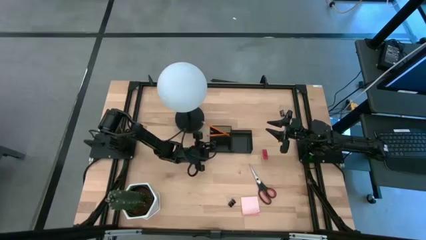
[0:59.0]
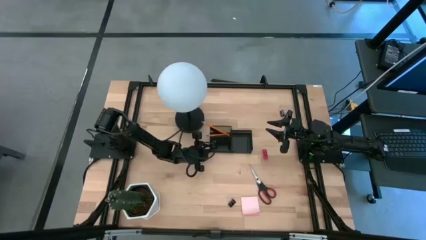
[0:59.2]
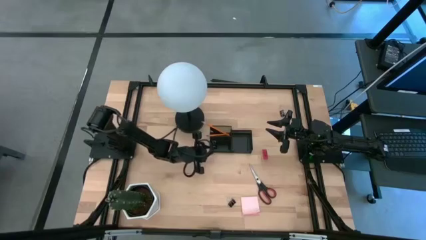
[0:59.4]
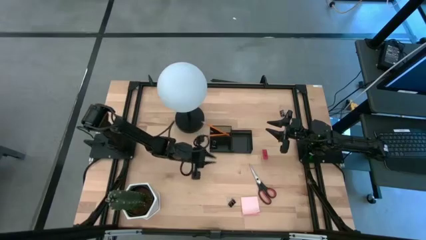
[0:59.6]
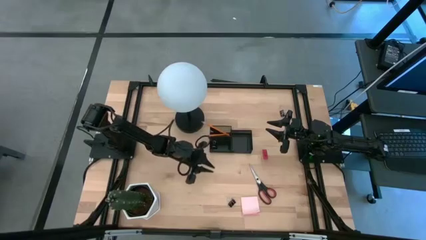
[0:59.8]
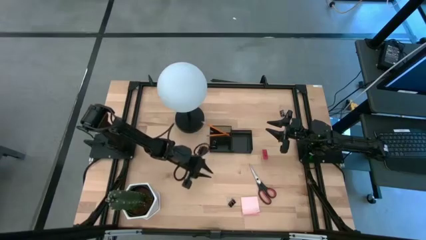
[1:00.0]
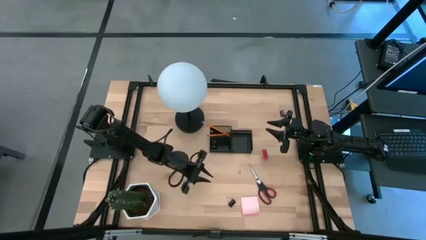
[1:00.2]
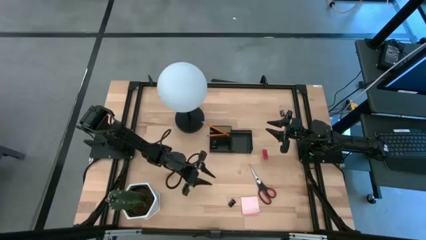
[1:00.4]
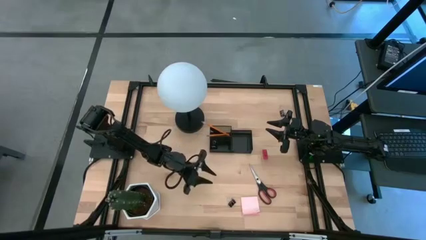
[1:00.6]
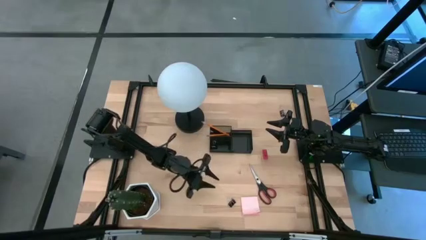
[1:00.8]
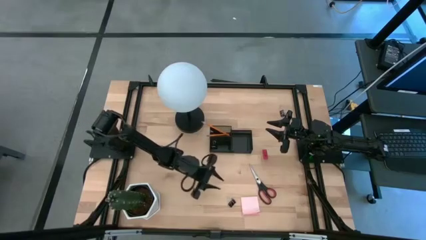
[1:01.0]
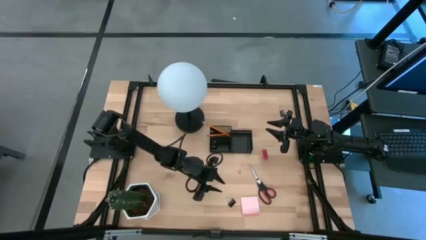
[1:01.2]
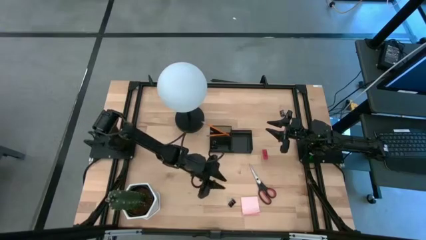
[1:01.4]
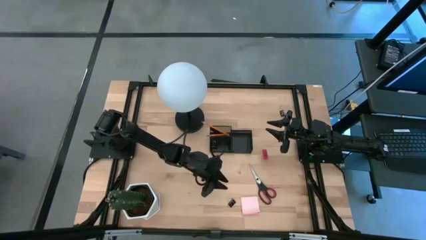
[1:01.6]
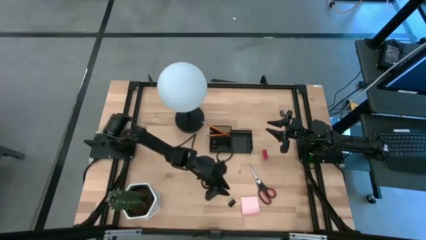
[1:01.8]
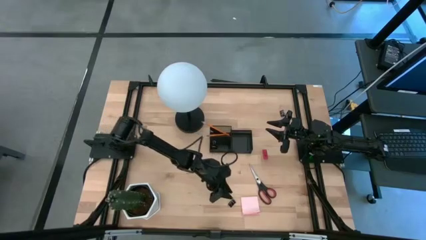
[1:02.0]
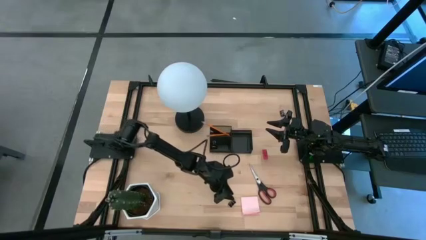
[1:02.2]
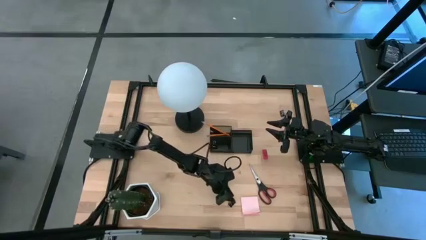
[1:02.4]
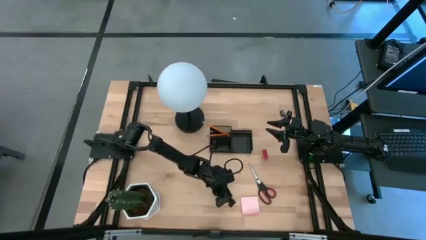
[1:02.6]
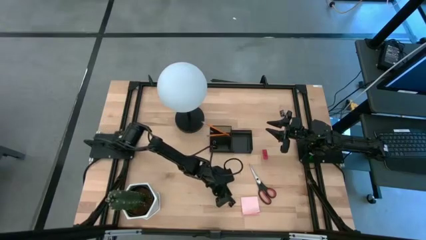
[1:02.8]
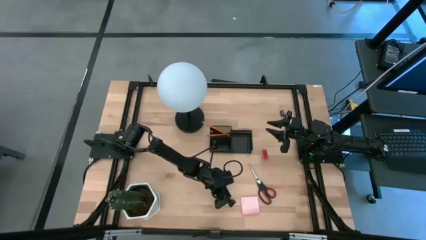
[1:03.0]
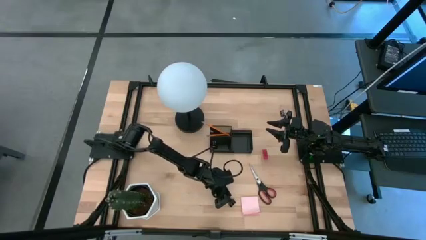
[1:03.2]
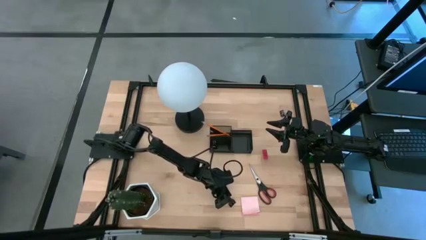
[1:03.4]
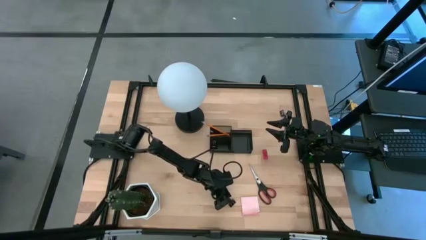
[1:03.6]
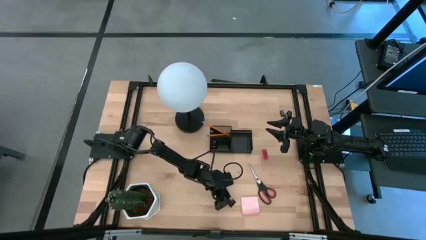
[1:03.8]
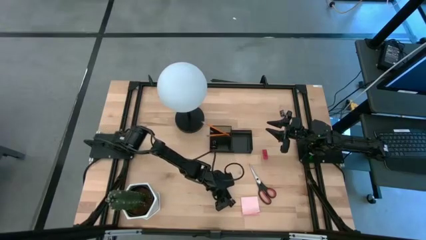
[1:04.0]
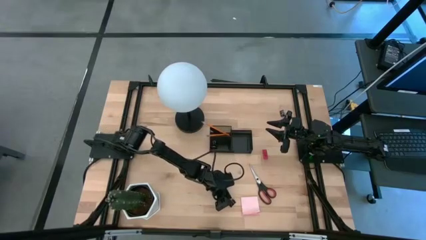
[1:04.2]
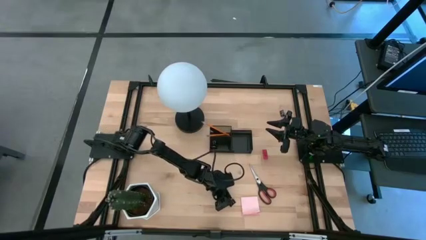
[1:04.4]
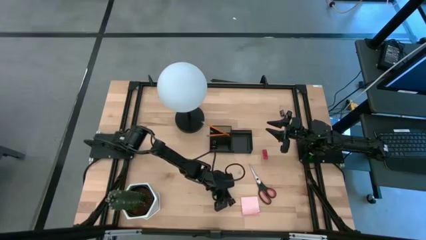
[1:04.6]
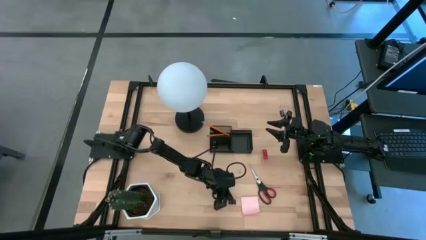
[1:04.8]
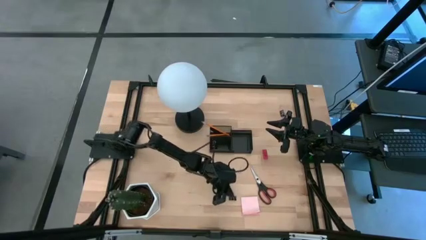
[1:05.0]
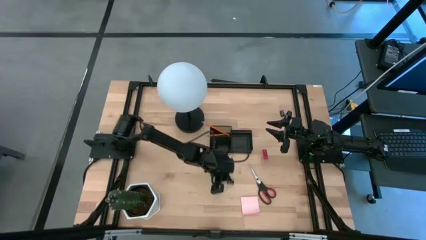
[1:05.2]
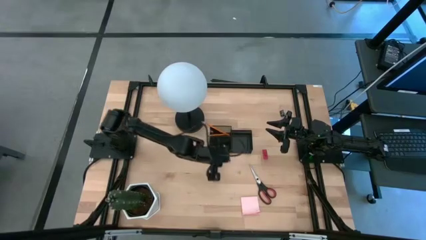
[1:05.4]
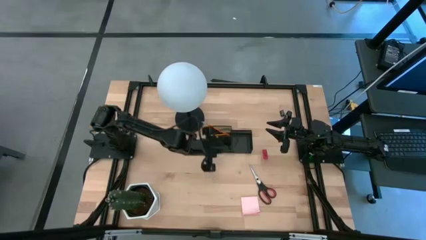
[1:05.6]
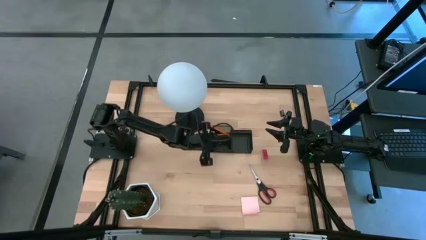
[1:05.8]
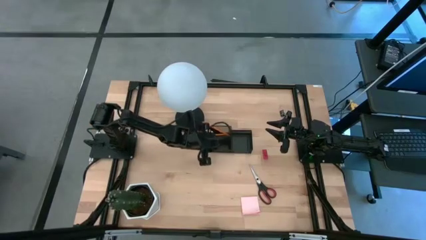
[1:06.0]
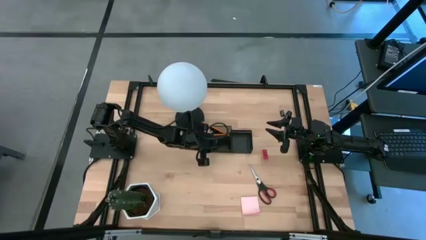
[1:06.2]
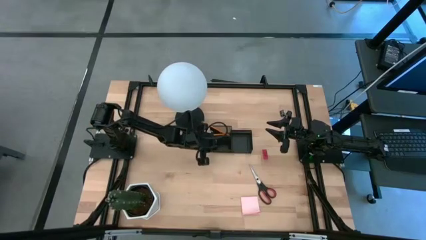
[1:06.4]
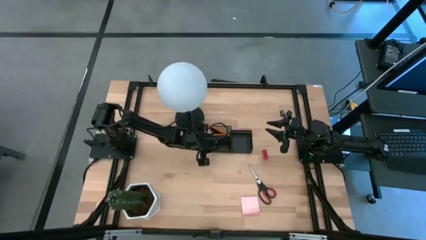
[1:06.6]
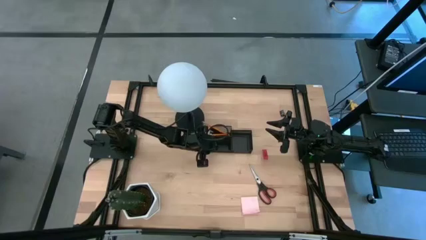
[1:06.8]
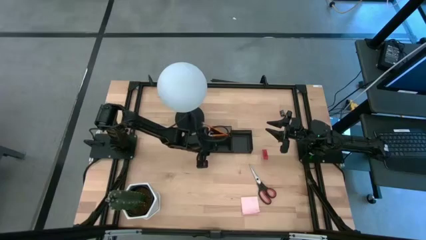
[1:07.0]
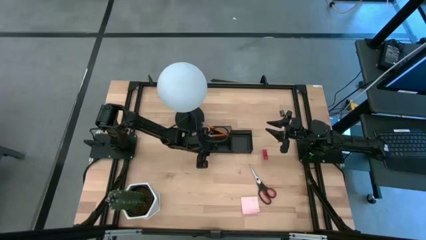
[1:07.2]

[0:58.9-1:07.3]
Task: Pick and place office supplies into organizer
Put the bottom black binder clip into the black desk organizer

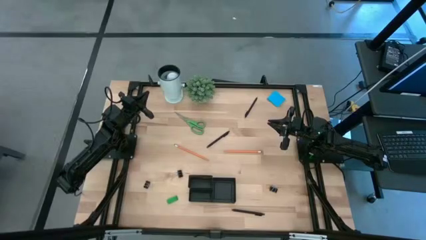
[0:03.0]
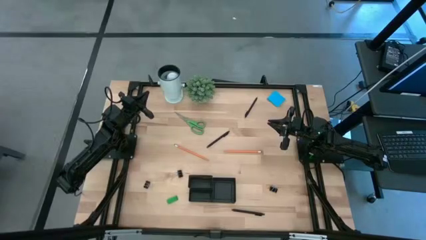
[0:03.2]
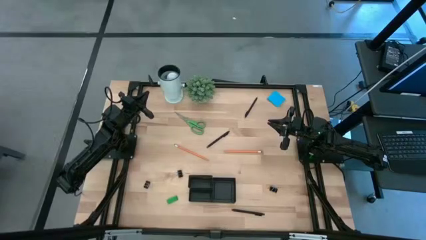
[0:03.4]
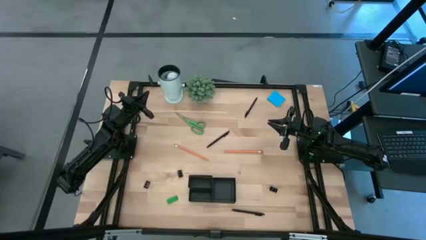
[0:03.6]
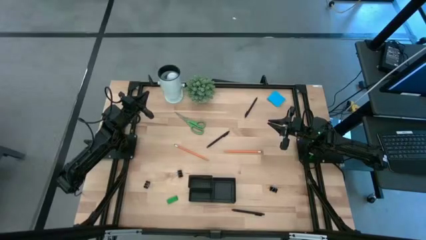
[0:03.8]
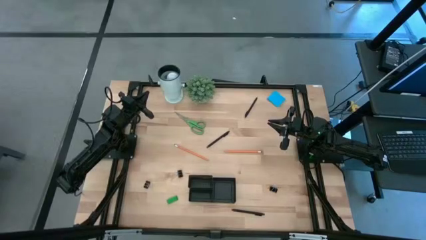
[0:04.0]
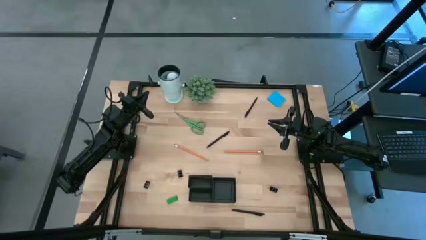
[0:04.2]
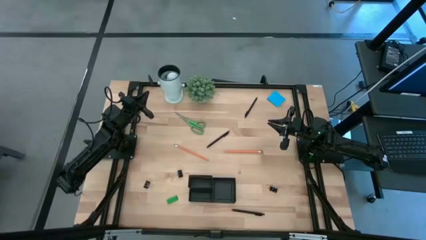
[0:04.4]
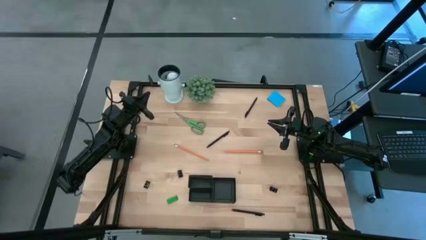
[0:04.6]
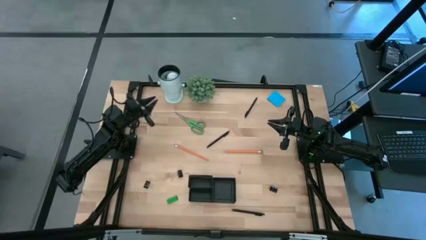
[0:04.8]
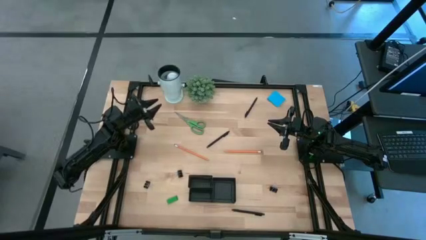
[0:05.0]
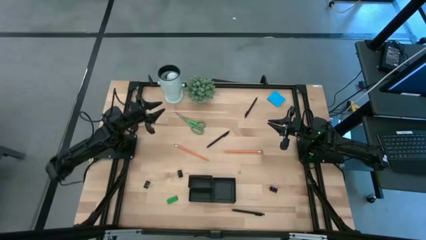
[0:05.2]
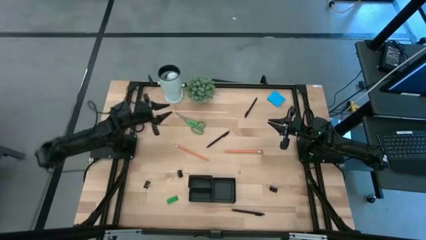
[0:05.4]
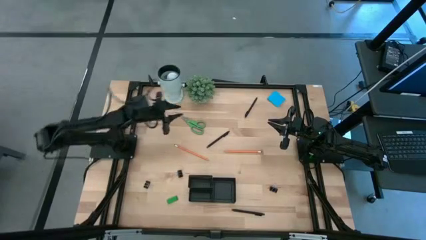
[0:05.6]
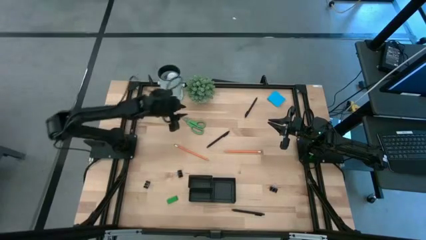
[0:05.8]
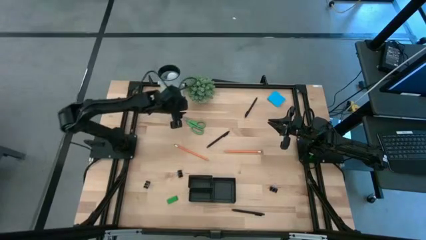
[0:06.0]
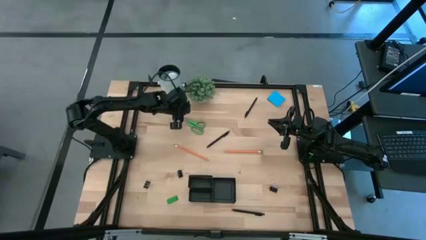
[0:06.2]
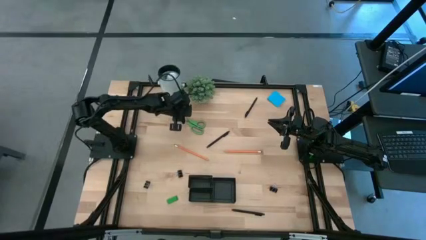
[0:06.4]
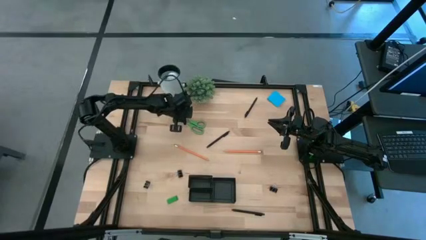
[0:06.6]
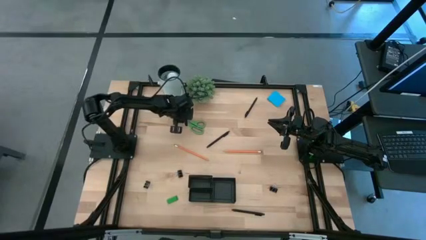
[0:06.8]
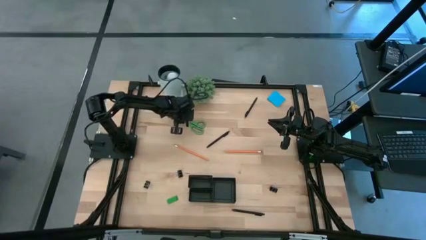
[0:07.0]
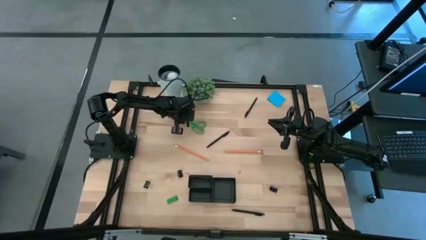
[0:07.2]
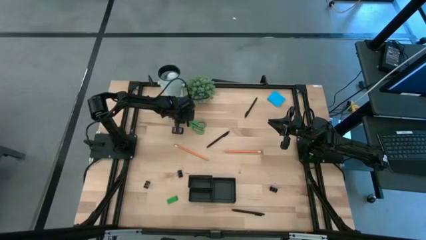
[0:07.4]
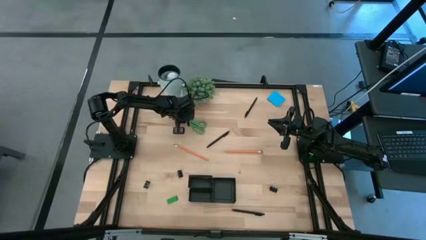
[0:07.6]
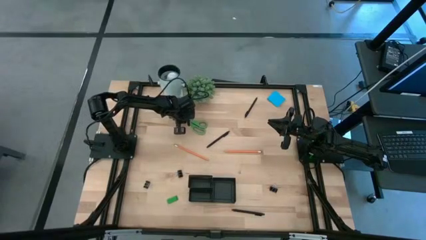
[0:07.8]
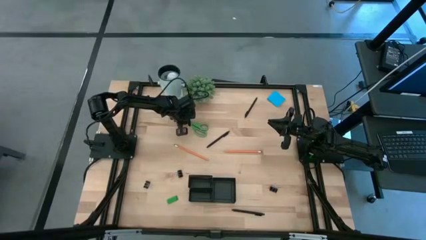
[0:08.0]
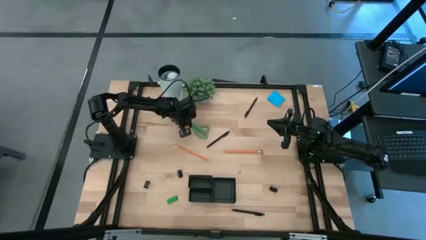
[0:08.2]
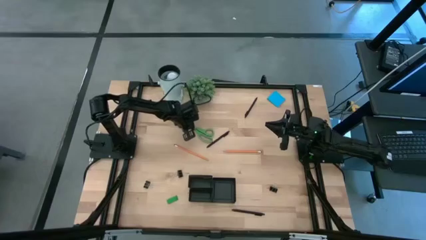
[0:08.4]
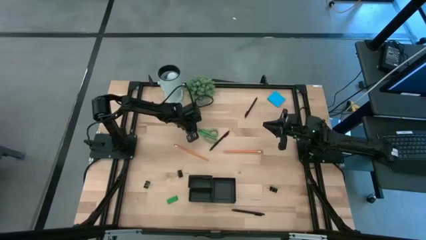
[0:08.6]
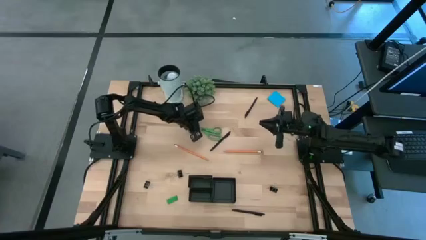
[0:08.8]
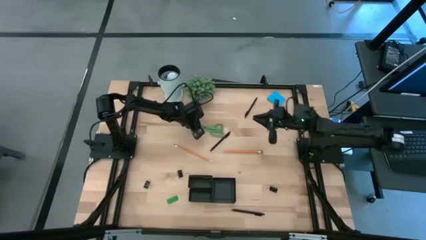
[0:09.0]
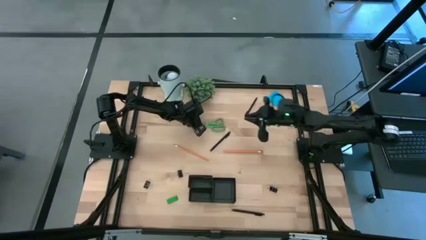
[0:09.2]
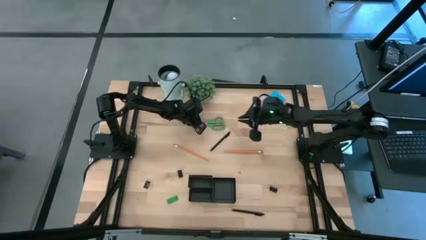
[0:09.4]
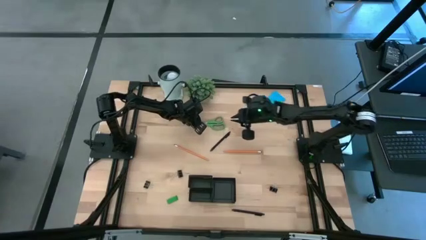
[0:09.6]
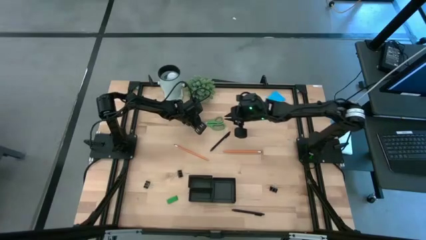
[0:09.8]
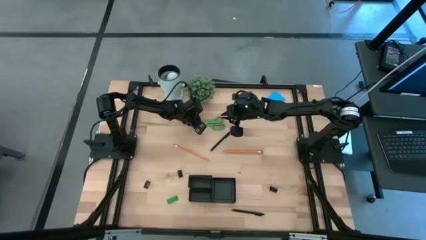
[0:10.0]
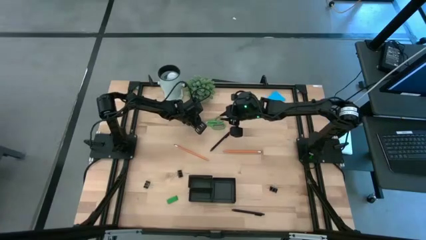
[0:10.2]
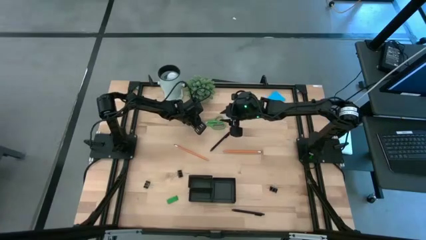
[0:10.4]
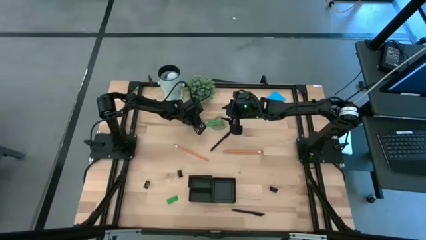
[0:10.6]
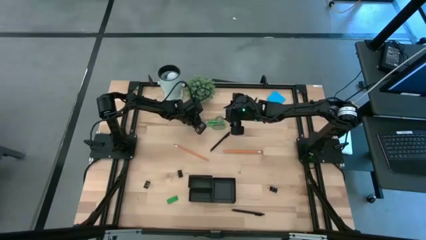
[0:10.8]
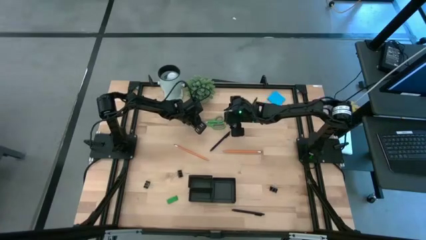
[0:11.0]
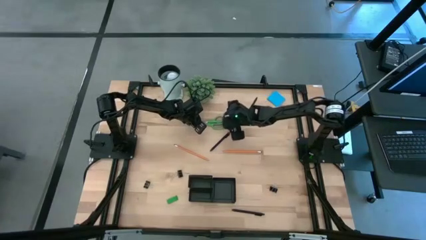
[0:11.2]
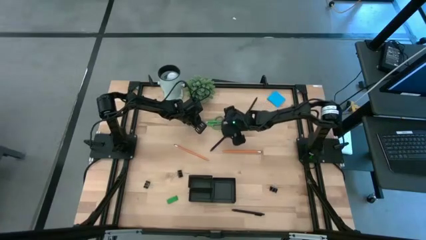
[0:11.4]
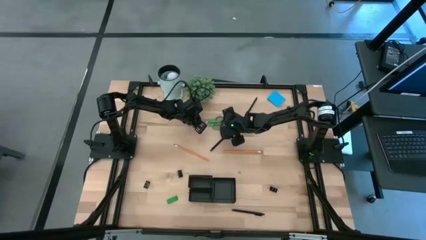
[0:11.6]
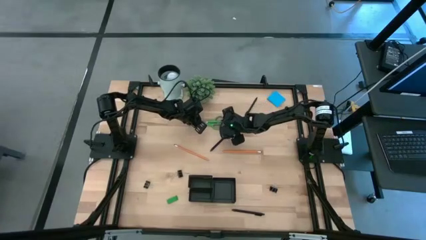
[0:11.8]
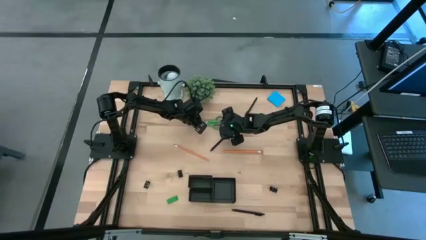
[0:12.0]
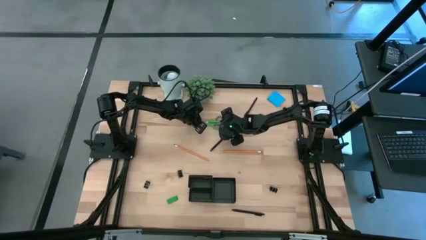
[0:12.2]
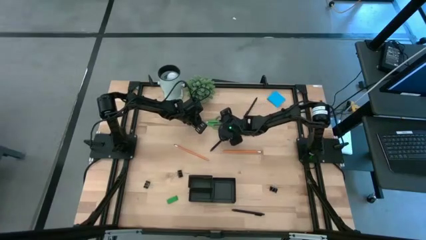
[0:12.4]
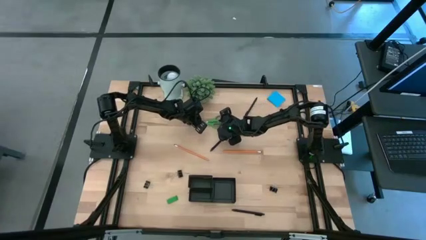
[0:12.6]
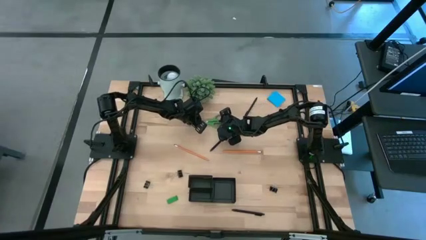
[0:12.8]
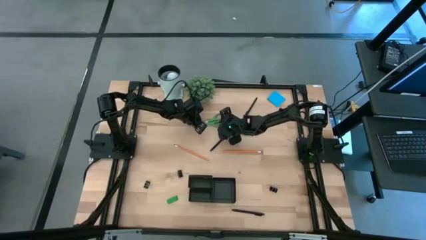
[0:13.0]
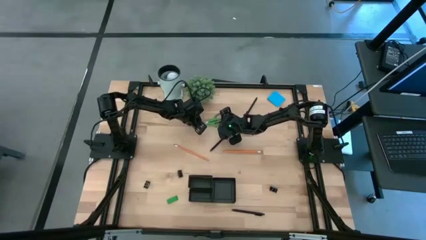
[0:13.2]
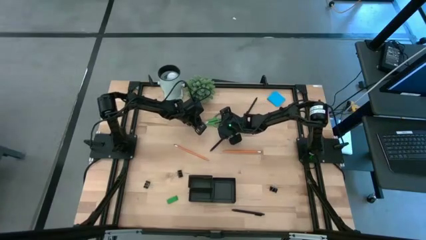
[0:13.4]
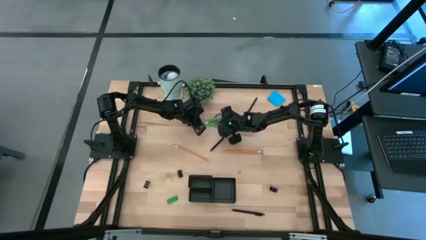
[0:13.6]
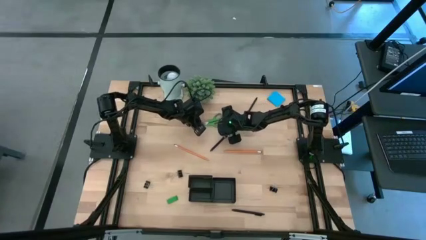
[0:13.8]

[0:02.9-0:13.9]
Task: Pick and place office supplies into organizer
Put the green scissors into the black desk organizer
